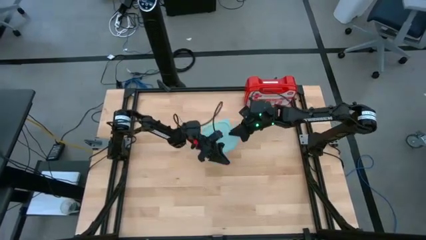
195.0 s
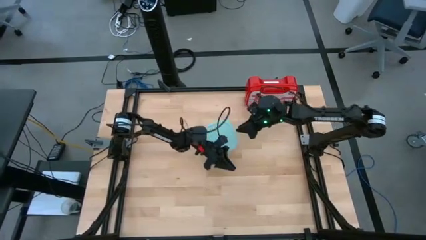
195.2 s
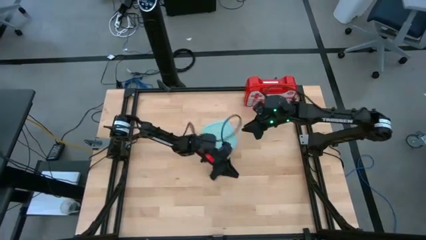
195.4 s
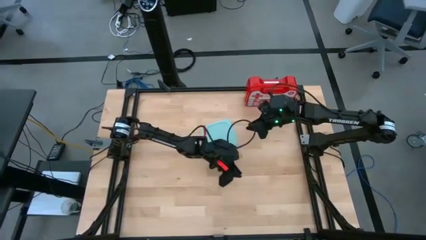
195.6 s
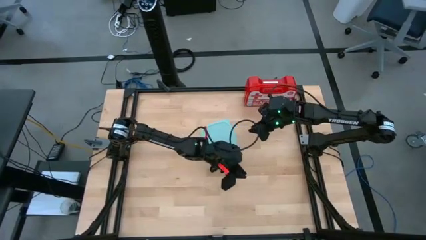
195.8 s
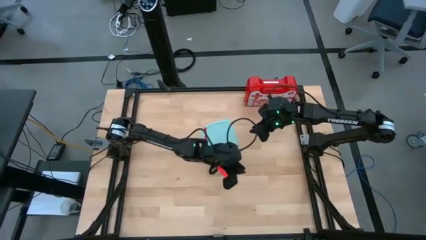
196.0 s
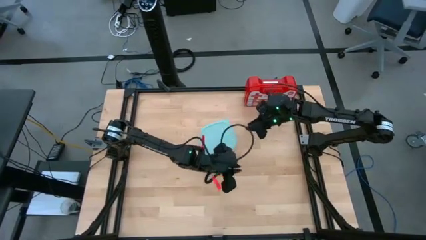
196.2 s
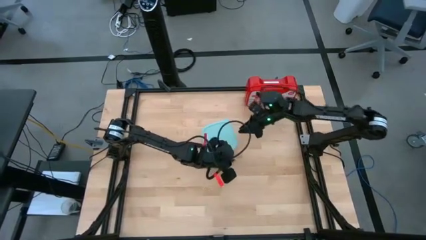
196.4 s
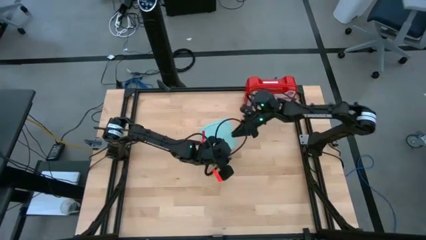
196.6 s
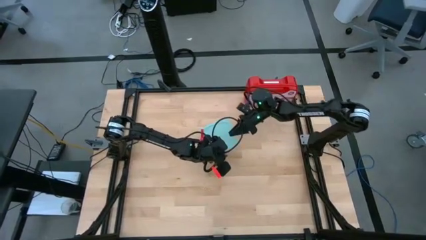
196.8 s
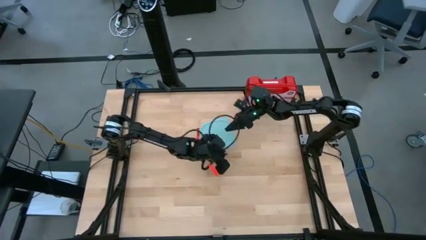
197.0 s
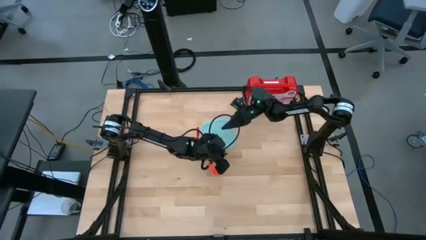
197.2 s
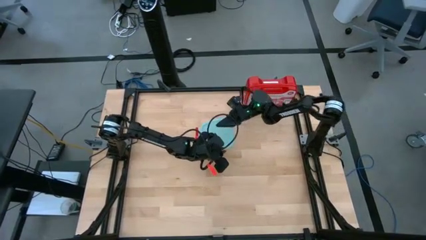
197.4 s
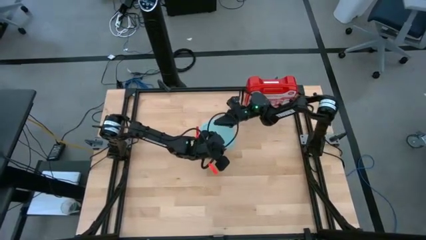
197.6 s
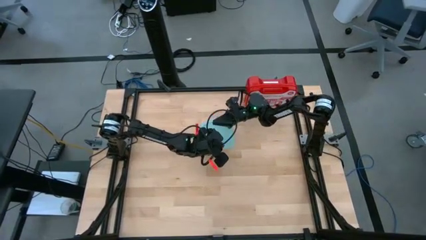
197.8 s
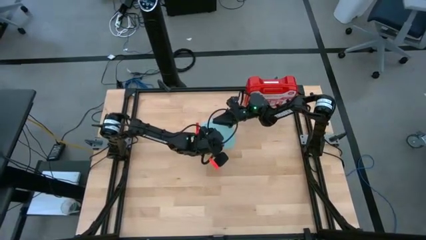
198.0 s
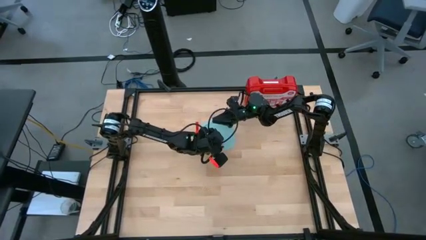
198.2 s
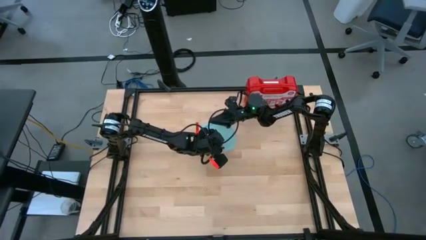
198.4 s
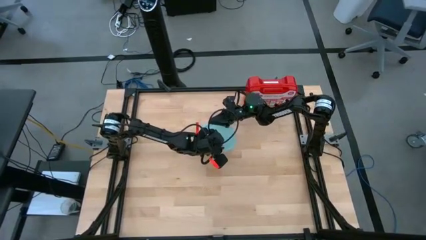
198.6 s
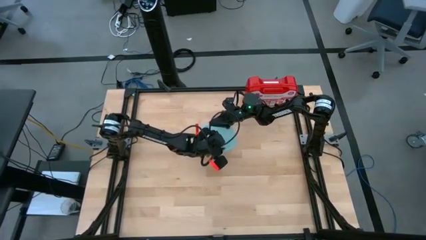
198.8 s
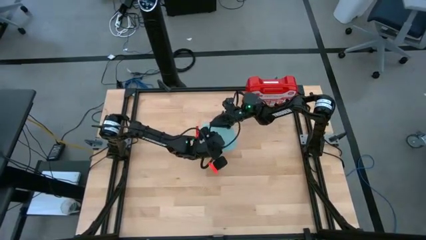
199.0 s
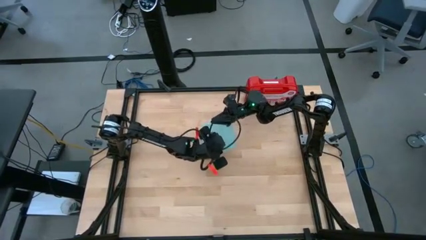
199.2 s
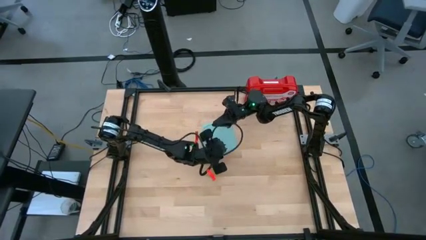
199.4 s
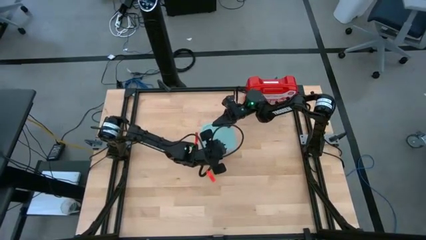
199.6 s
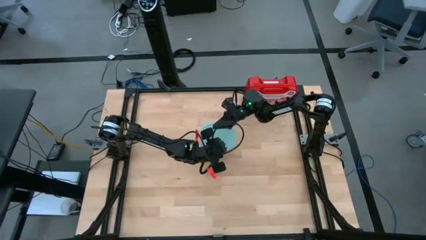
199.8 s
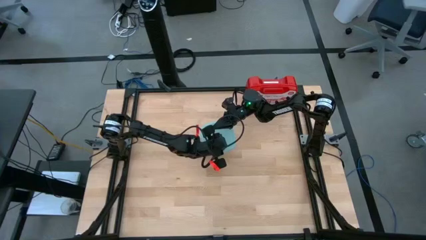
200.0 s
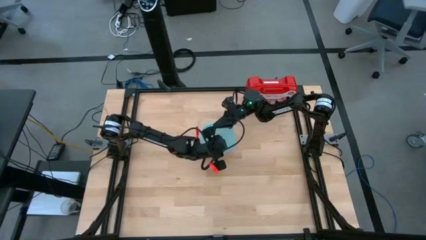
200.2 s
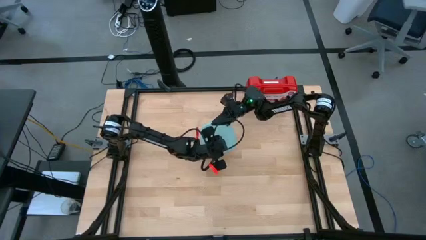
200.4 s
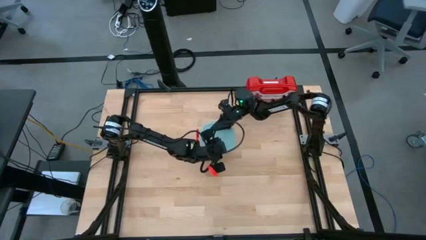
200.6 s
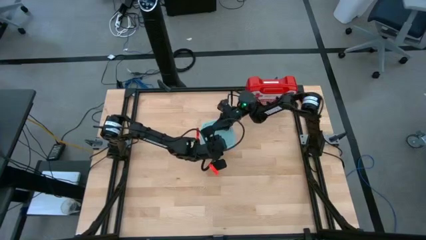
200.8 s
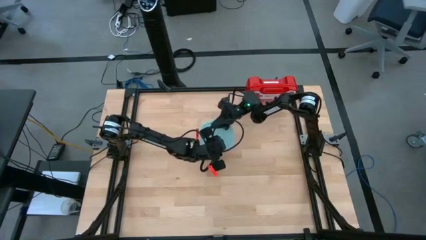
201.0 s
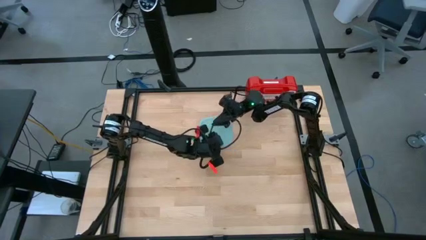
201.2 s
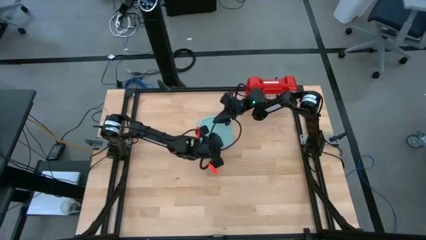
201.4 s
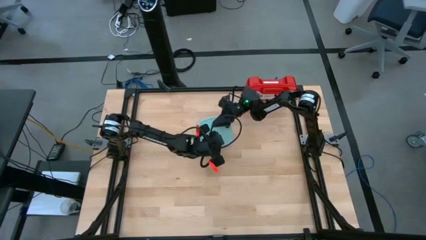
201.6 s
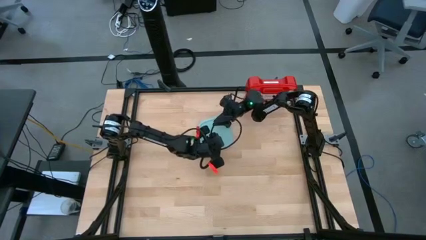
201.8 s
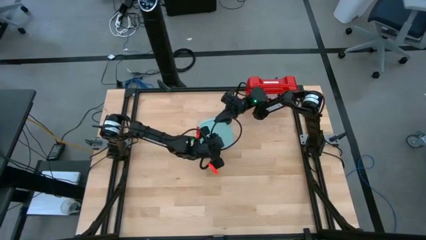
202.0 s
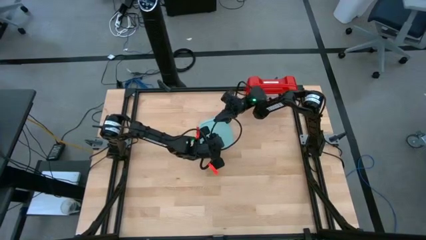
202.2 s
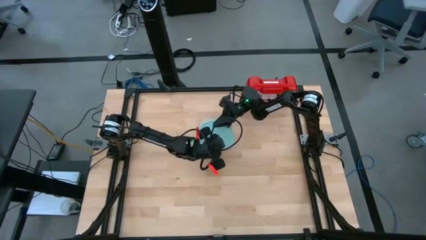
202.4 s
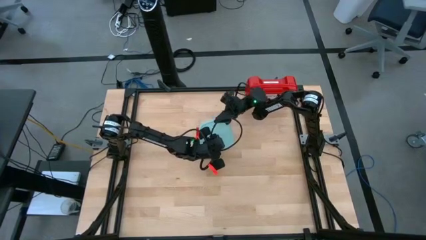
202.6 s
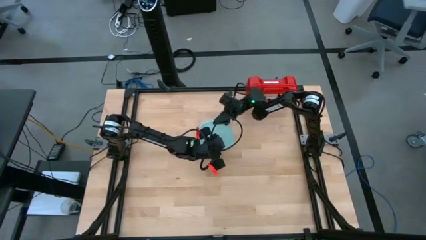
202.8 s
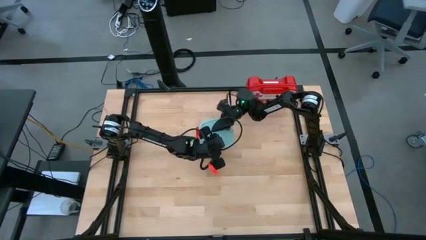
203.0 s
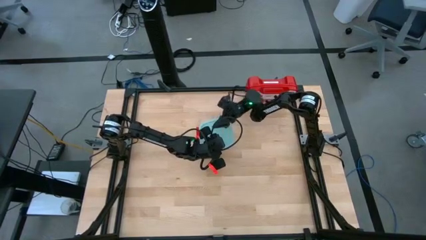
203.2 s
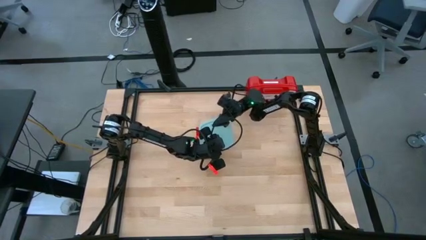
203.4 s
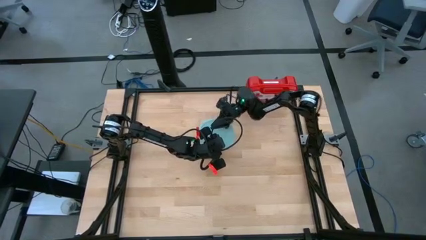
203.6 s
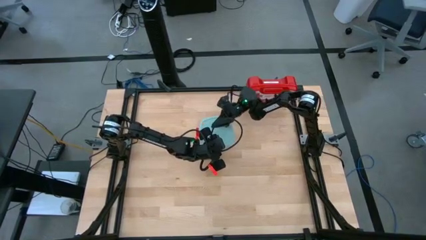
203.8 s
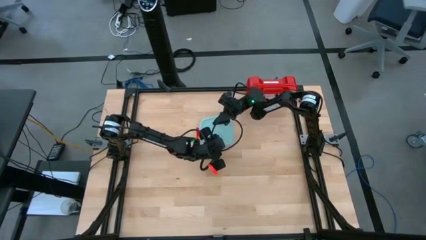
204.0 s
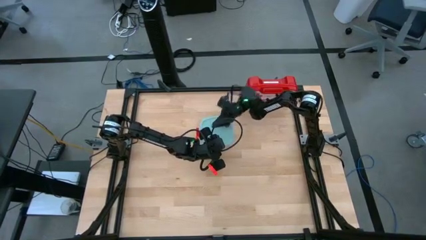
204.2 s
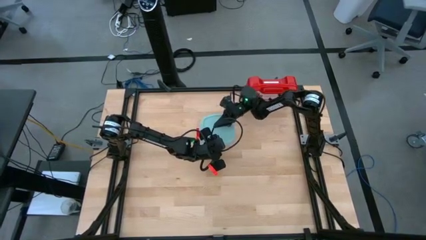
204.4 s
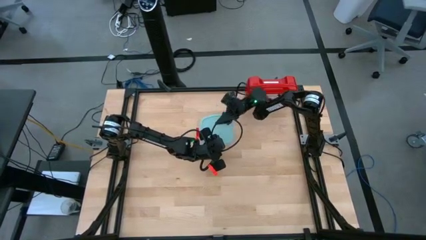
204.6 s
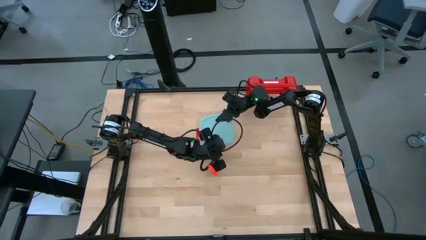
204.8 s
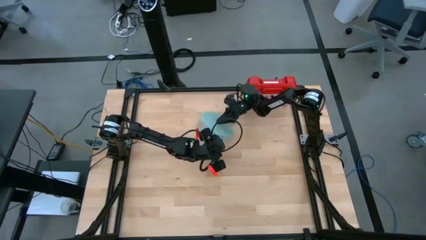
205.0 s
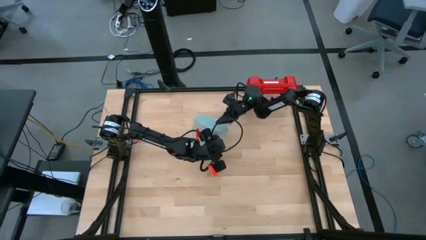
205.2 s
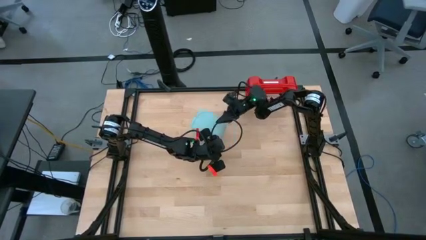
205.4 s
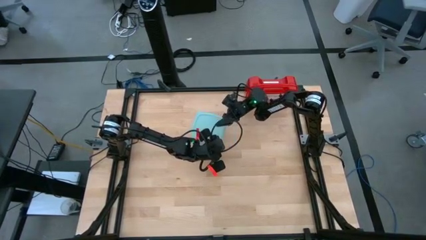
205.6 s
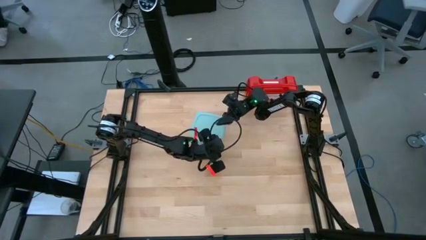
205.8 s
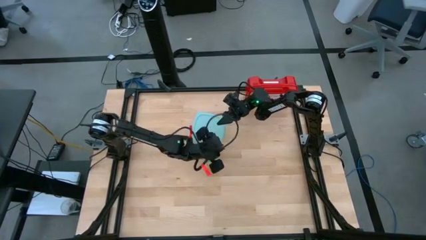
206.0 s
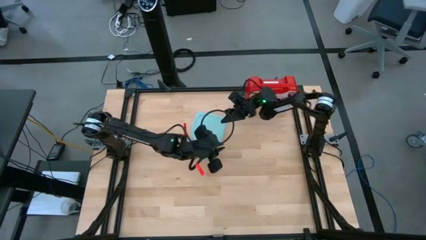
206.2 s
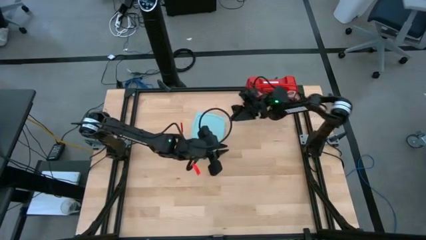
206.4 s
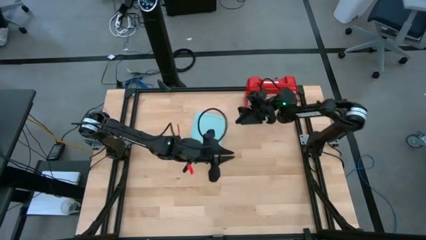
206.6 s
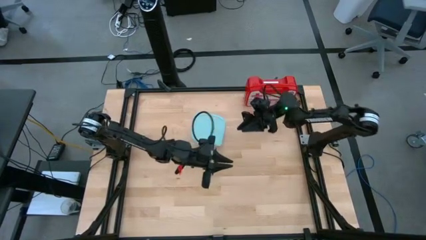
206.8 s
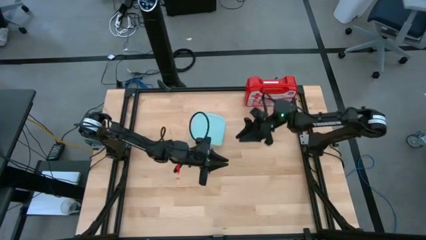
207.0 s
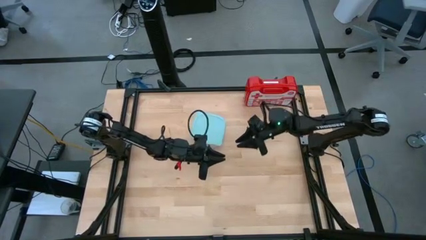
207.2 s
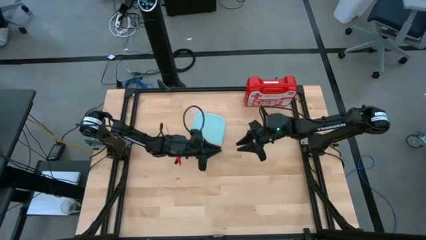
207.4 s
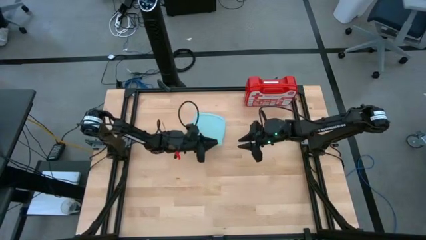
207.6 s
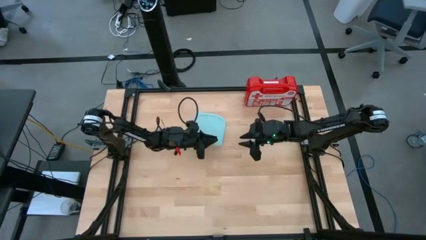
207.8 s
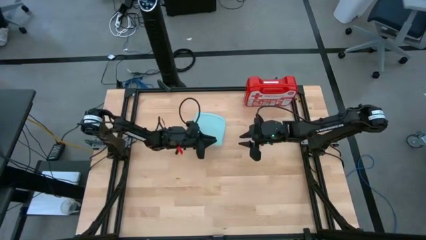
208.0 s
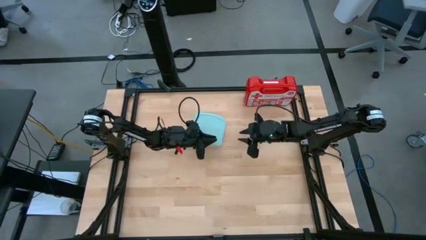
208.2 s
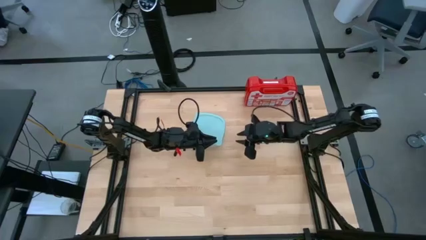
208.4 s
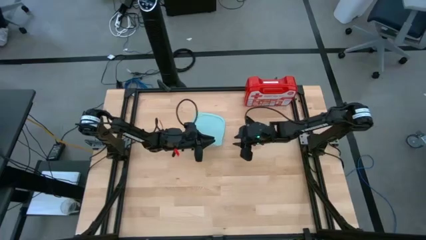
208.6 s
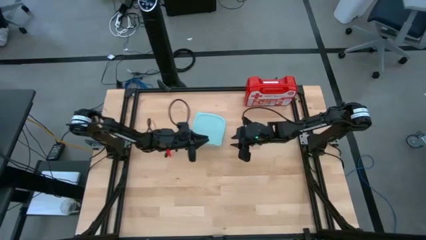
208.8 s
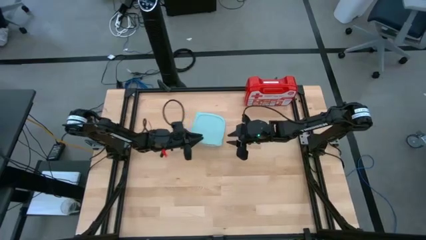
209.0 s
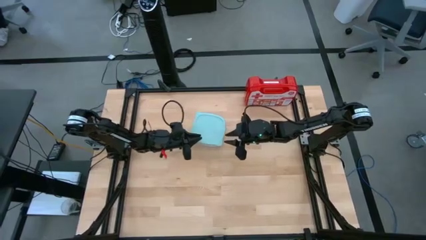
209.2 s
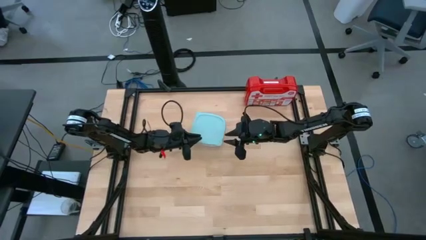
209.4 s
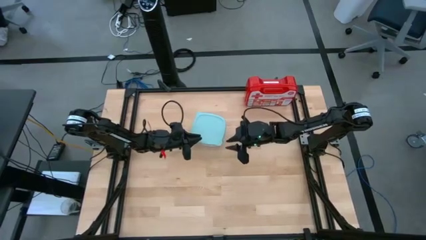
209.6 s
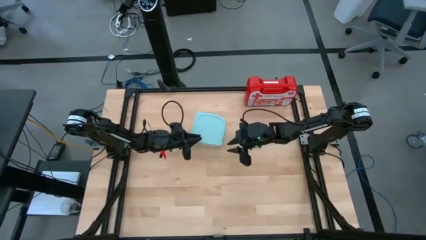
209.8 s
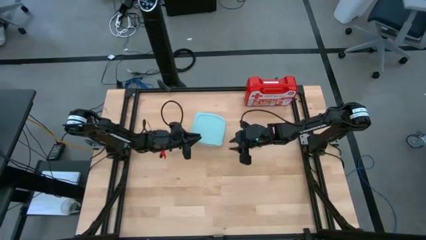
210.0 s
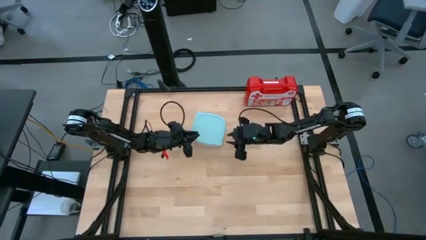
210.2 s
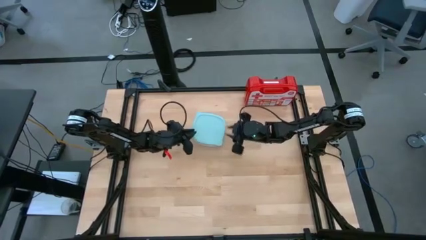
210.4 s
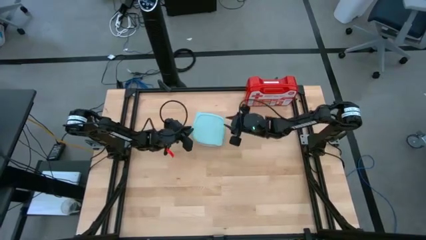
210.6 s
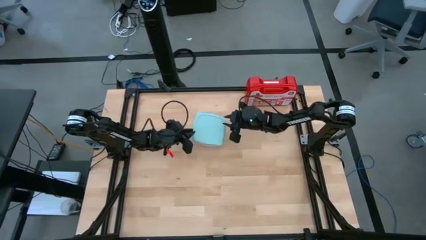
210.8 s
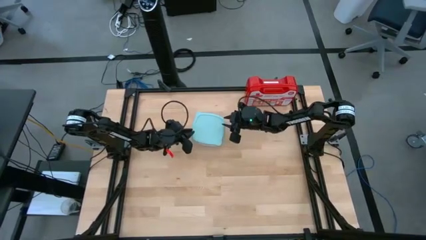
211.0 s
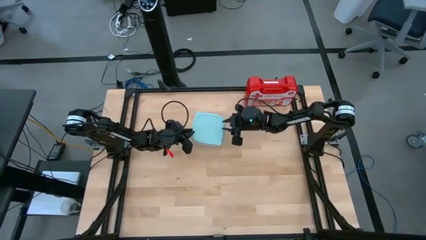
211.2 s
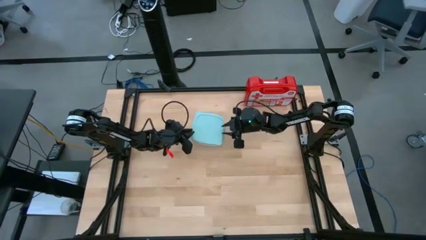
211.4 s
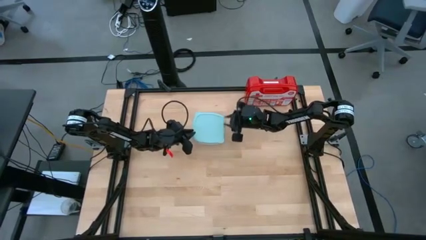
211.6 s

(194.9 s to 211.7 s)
Task: Roll bandage
Close the plastic container
